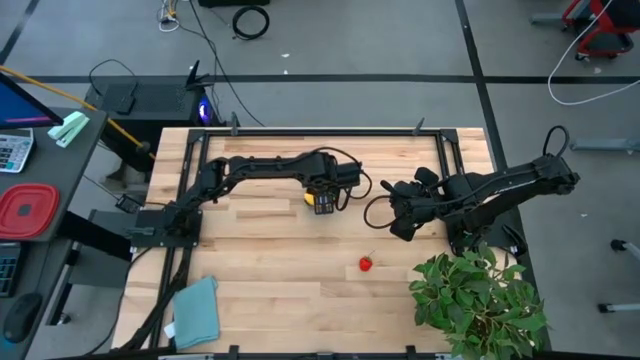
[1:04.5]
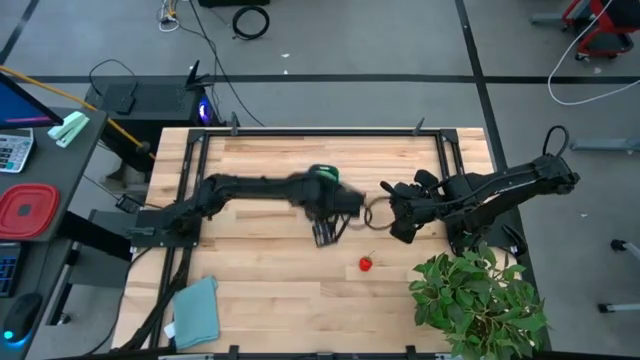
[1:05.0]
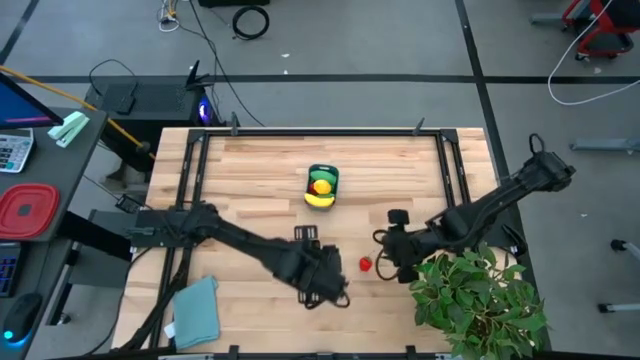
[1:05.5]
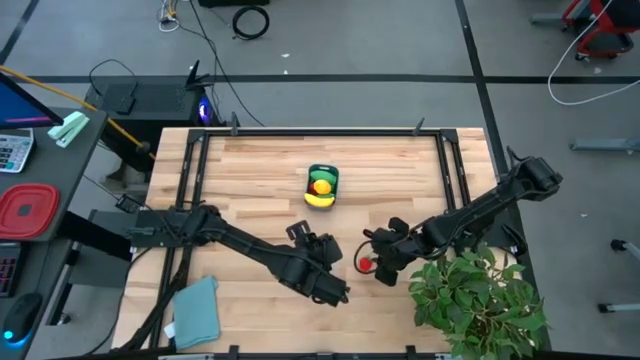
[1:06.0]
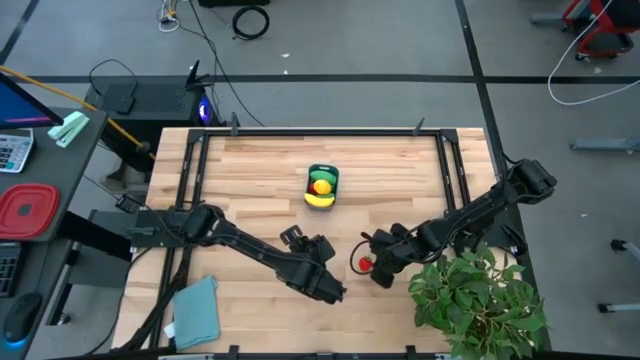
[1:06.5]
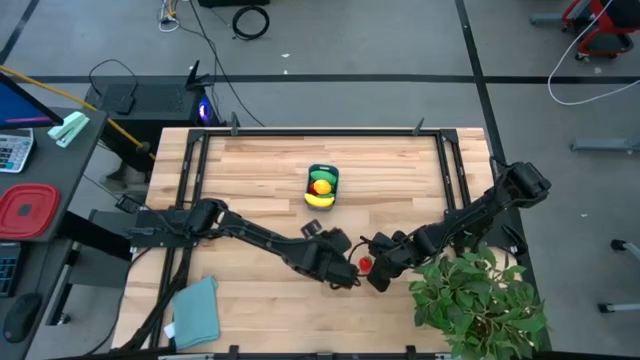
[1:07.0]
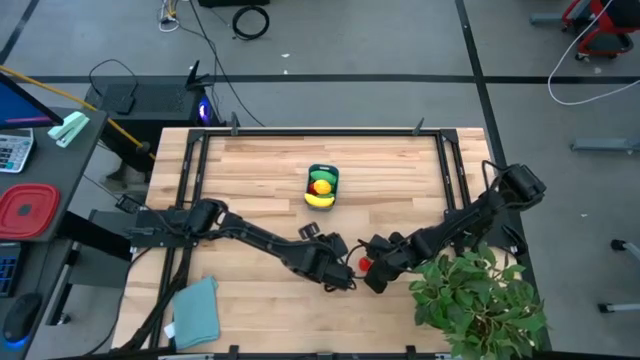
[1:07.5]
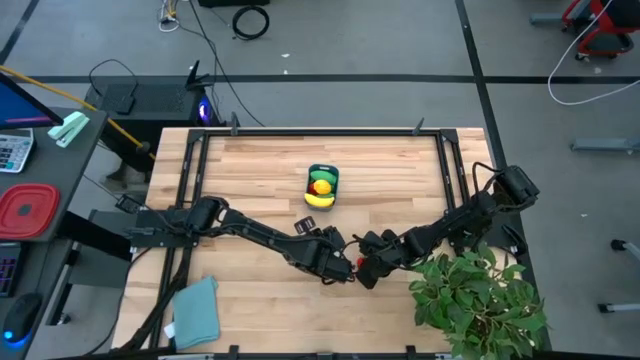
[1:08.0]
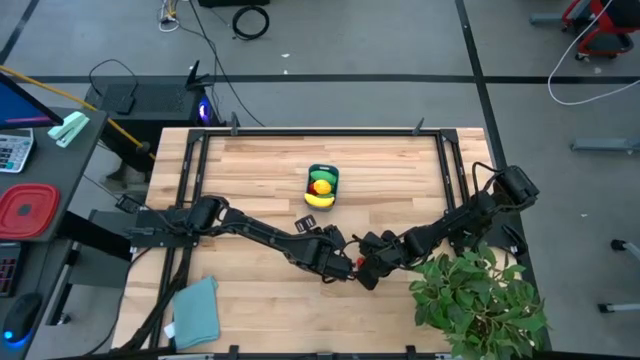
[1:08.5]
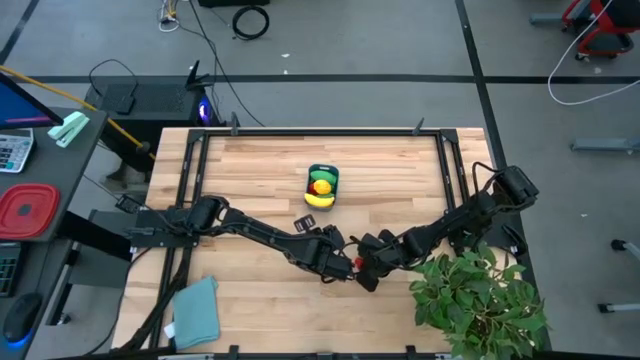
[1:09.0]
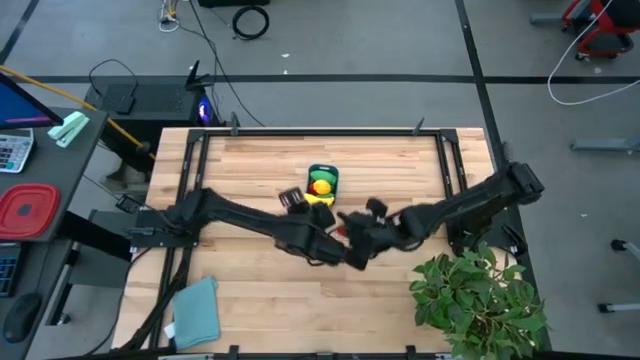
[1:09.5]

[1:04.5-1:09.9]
Task: Pick and placing Produce into tupperware
Put the red strawberry into the blue bin

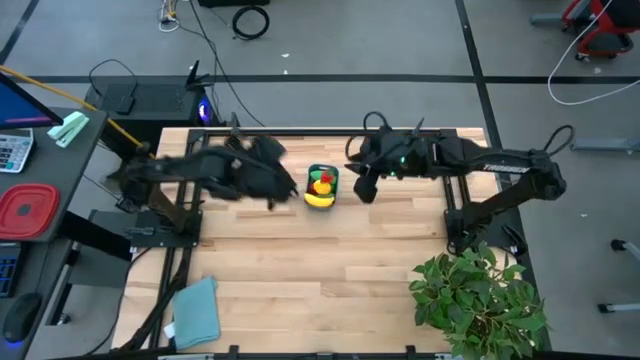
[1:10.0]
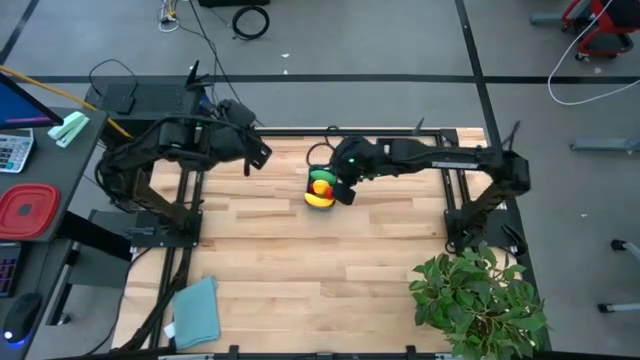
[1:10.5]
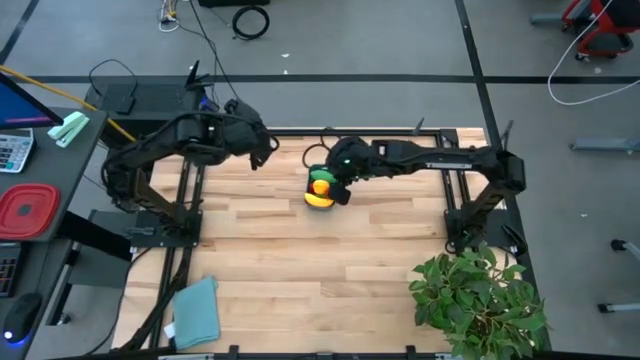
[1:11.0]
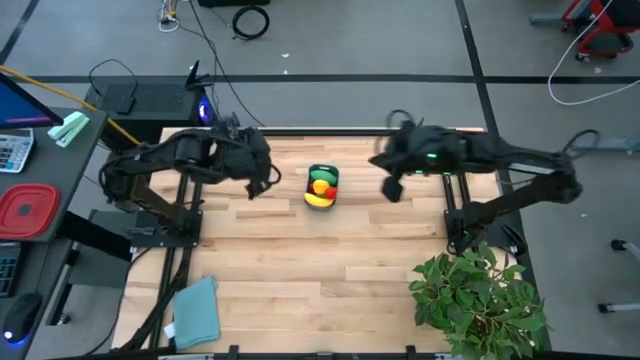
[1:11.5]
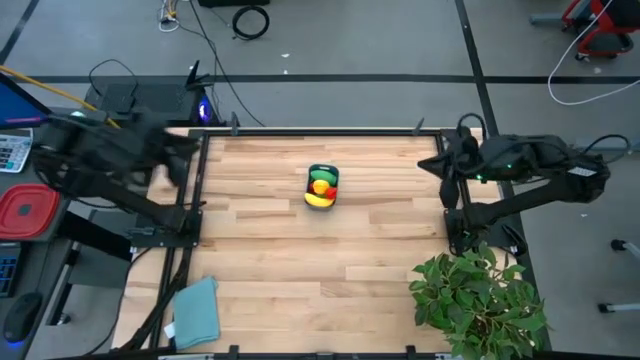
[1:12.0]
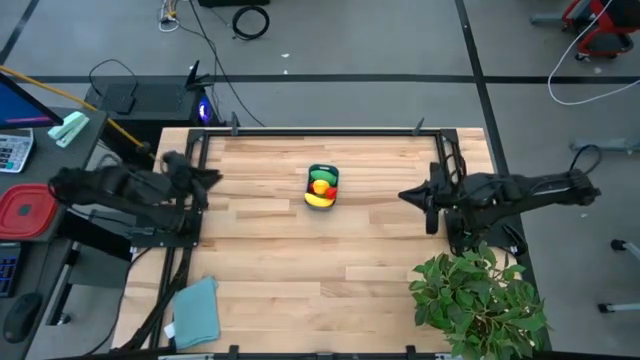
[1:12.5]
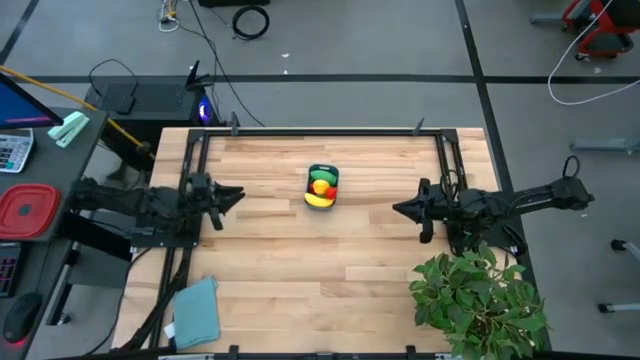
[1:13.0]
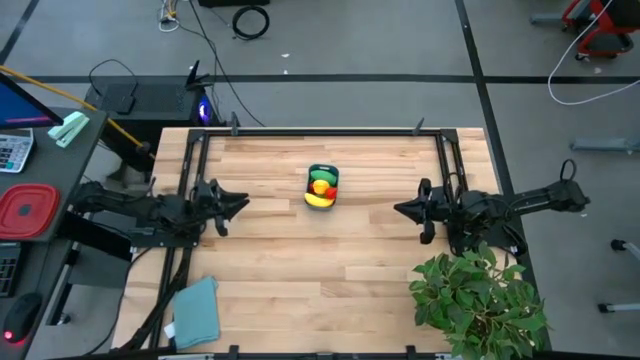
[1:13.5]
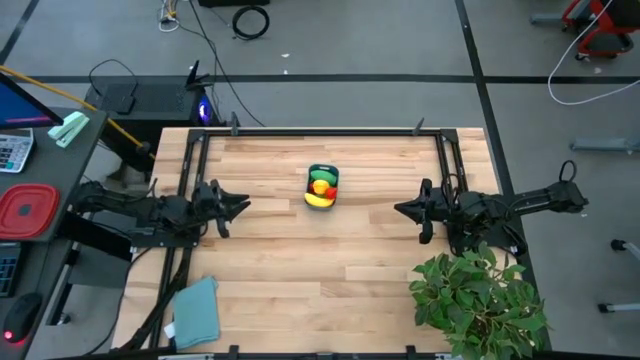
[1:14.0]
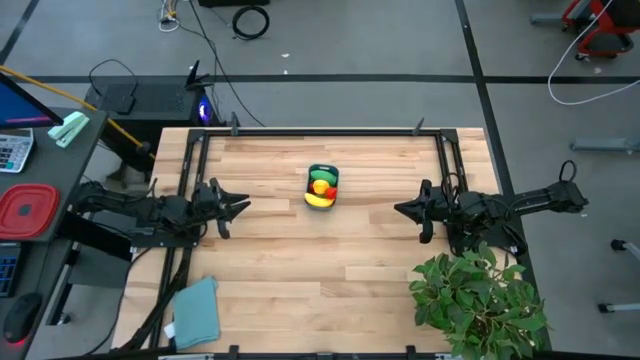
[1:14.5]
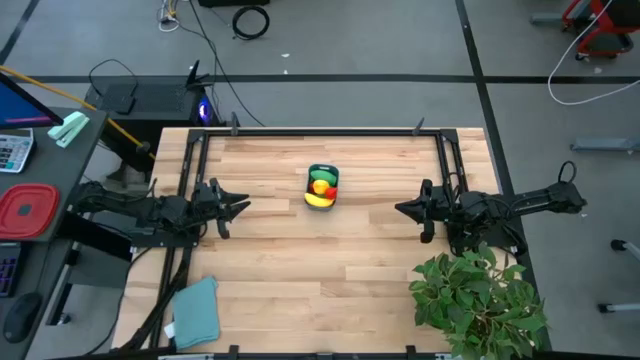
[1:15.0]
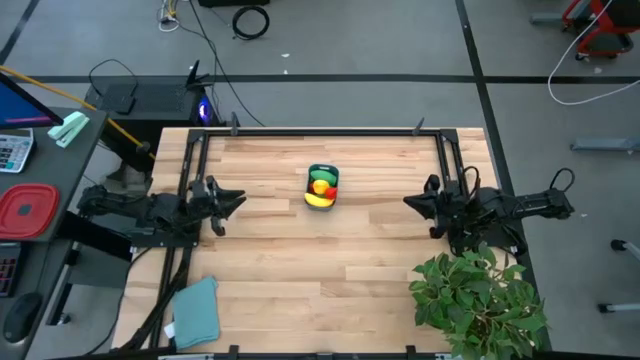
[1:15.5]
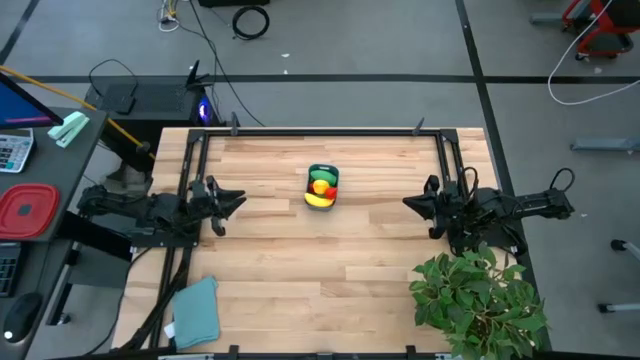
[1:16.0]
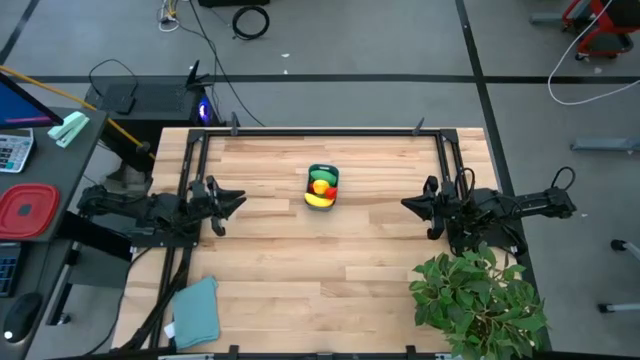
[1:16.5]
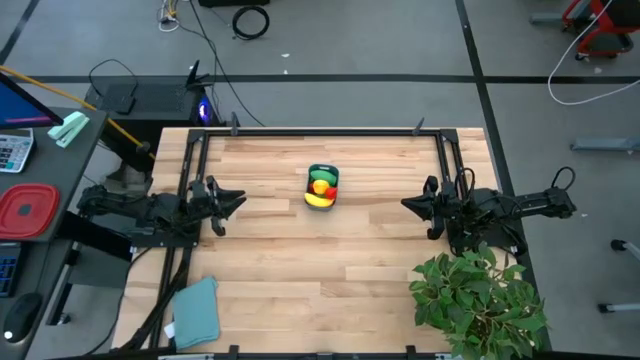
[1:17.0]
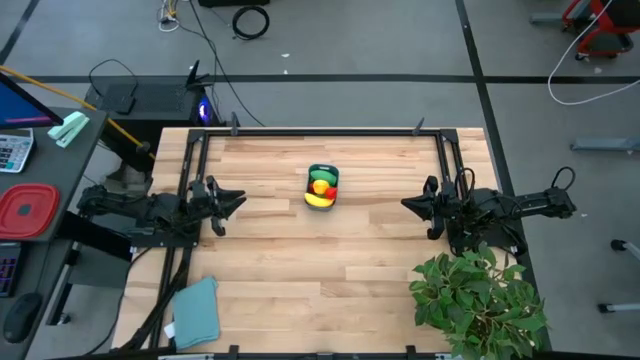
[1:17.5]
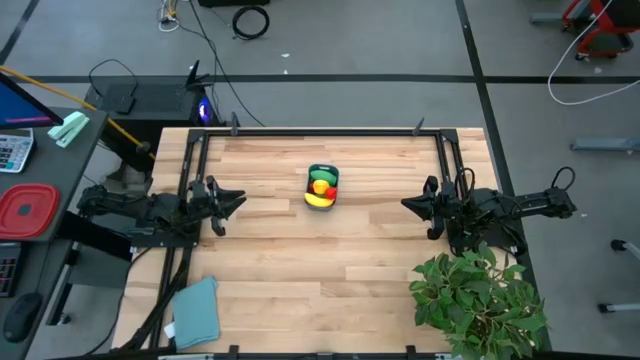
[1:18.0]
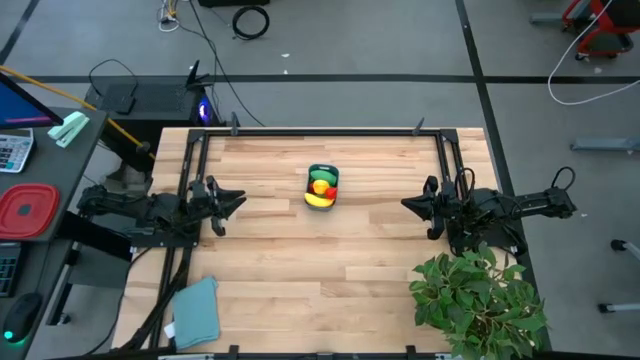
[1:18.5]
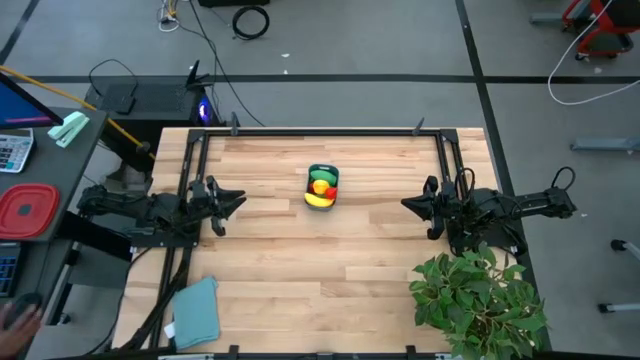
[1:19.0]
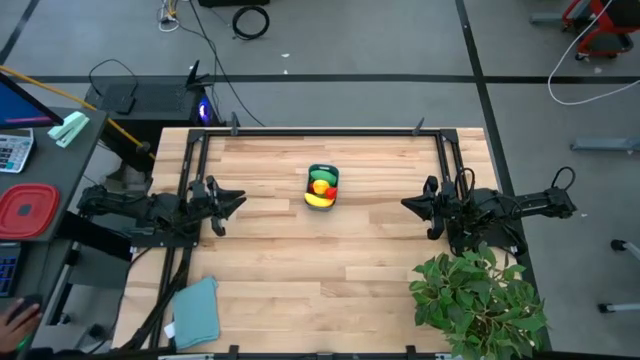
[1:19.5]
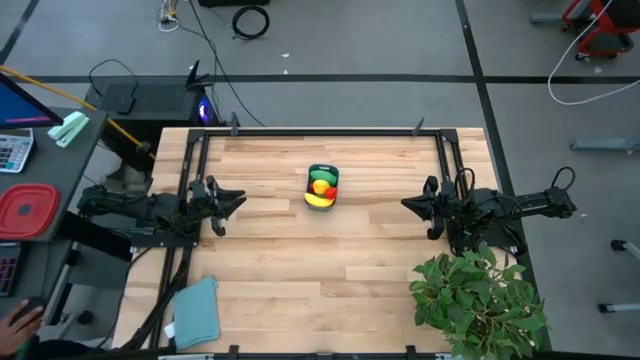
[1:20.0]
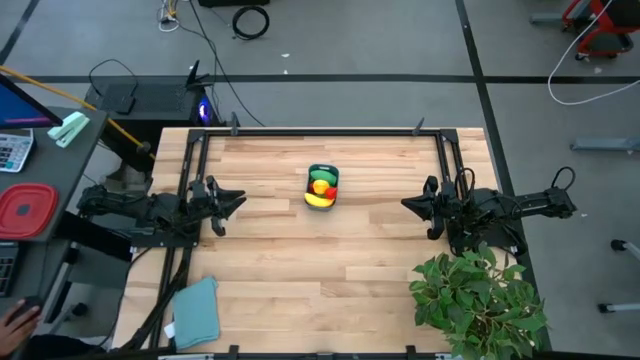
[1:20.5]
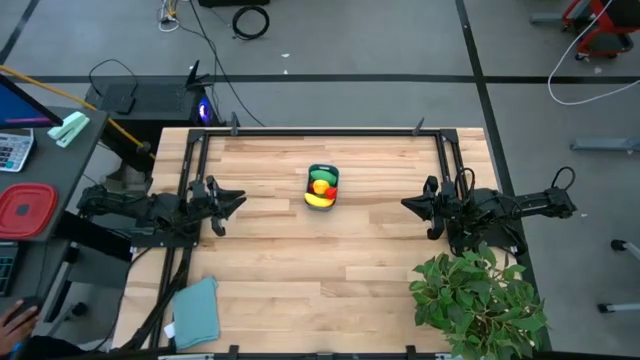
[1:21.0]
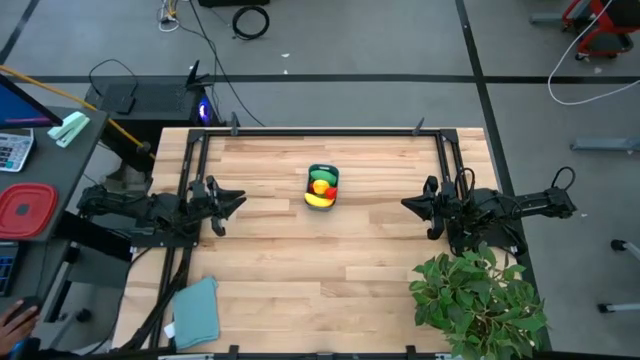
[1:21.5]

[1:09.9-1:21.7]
Return to Home Position

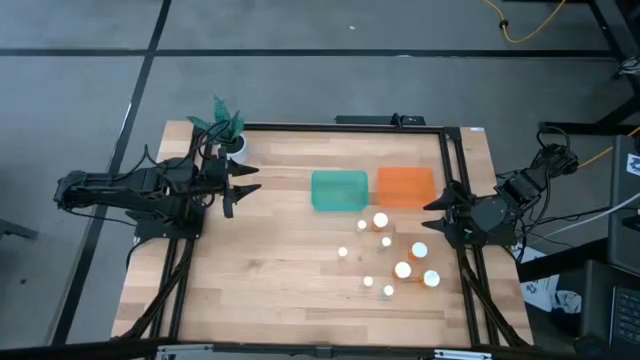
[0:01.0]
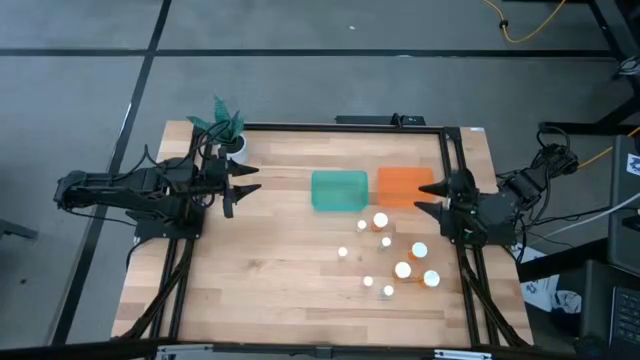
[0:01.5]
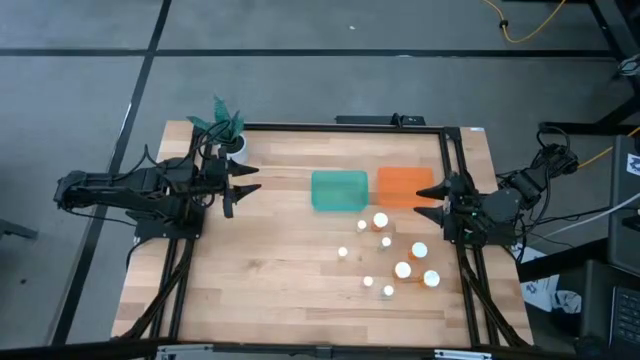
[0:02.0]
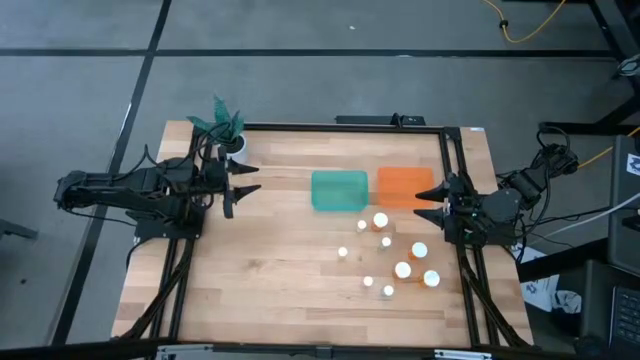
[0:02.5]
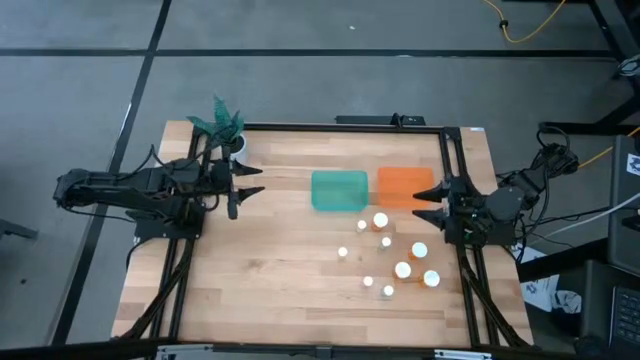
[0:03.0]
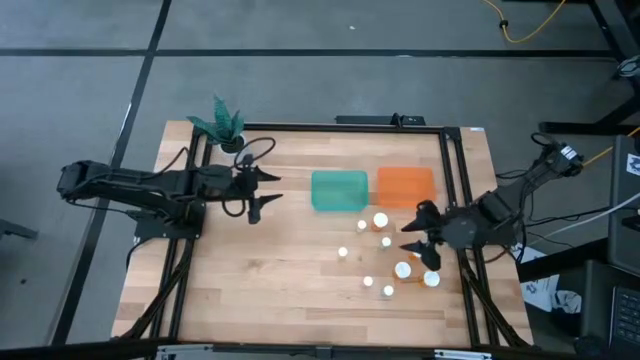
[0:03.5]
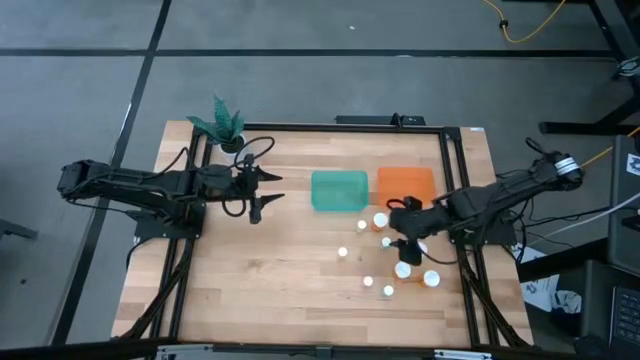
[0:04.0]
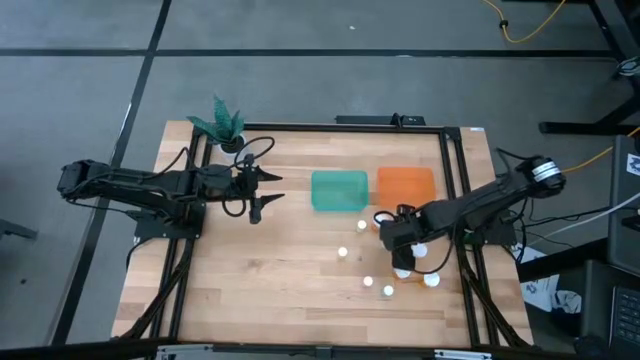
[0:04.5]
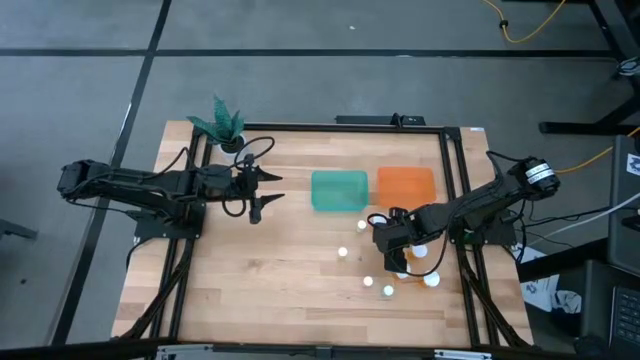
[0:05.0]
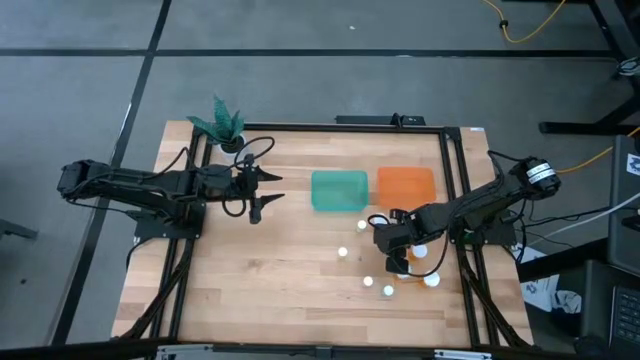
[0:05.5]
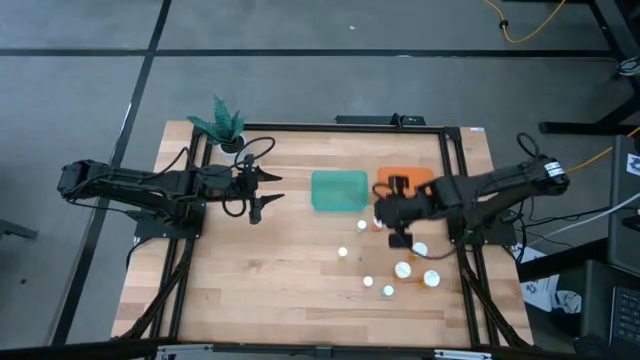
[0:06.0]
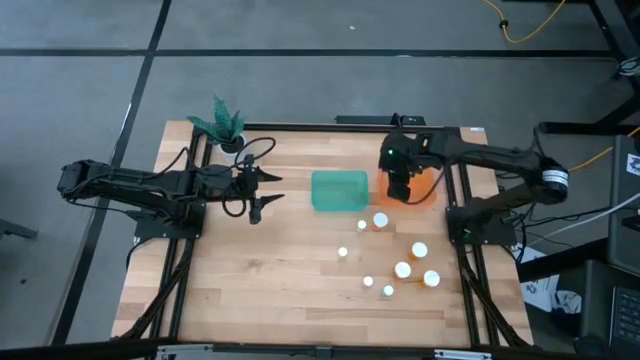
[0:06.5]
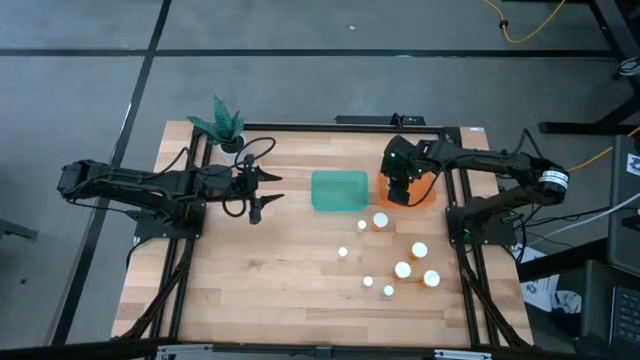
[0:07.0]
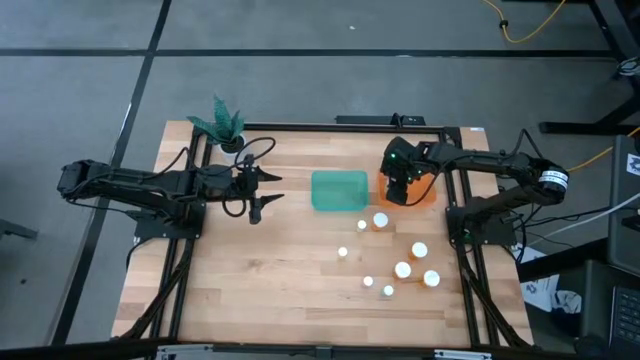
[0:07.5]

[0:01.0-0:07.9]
Task: Pick and place medicine bottles into bin by pill shape (circle, oval)
Put the blue pill bottle into the orange bin
